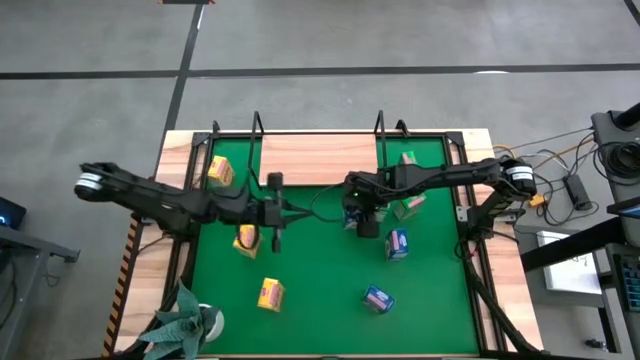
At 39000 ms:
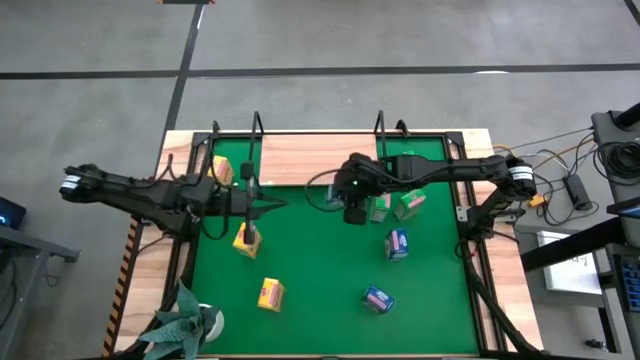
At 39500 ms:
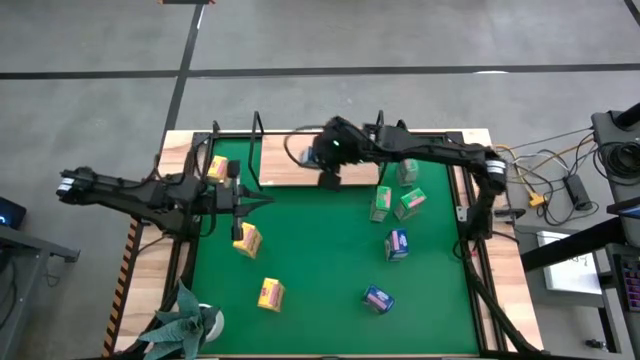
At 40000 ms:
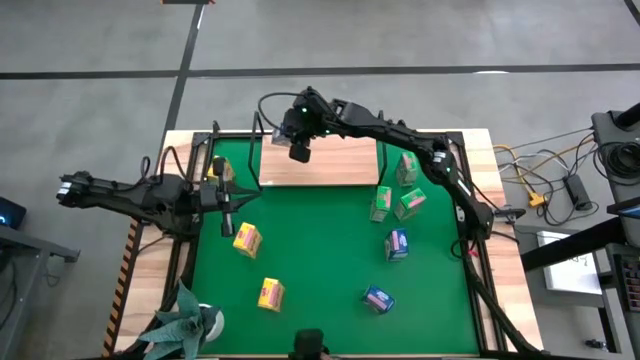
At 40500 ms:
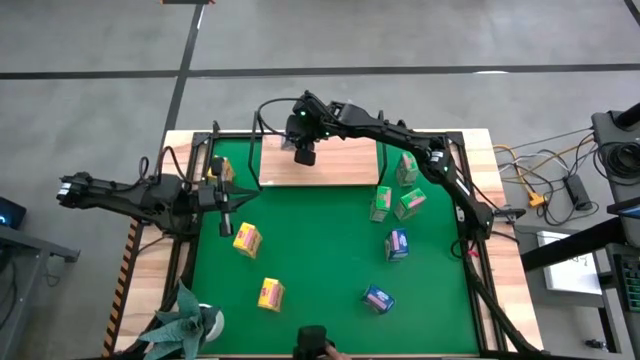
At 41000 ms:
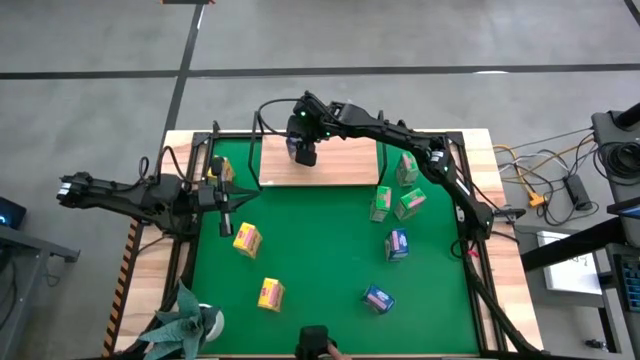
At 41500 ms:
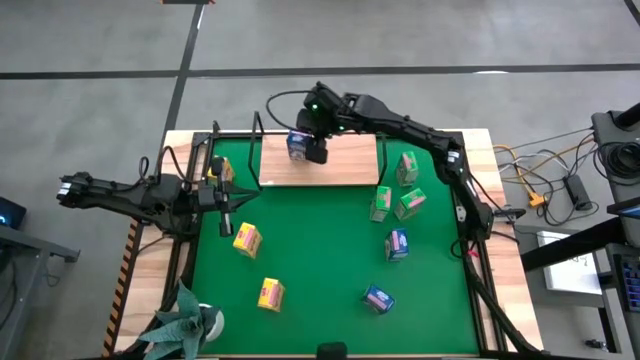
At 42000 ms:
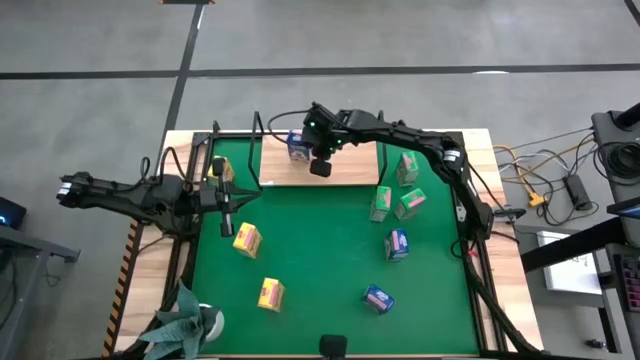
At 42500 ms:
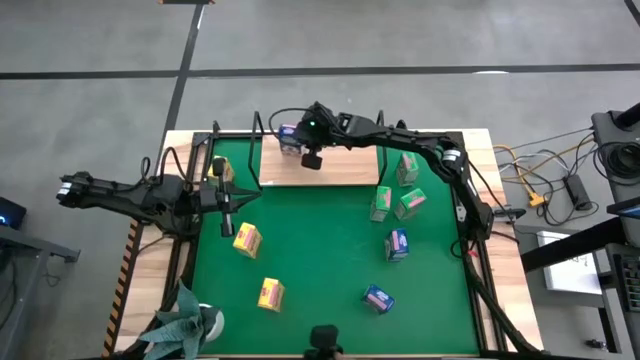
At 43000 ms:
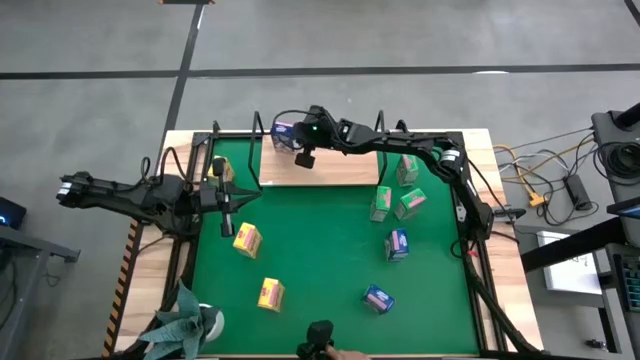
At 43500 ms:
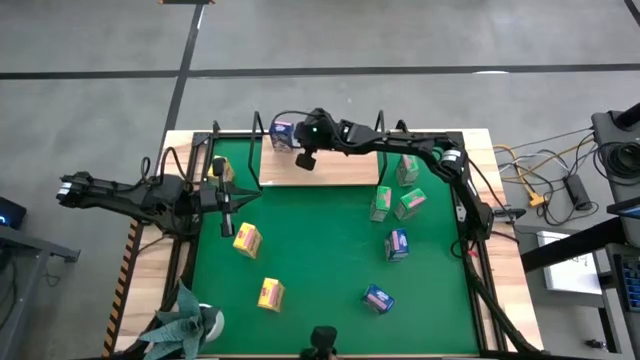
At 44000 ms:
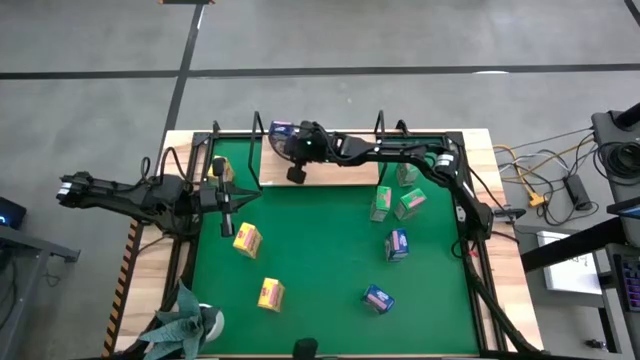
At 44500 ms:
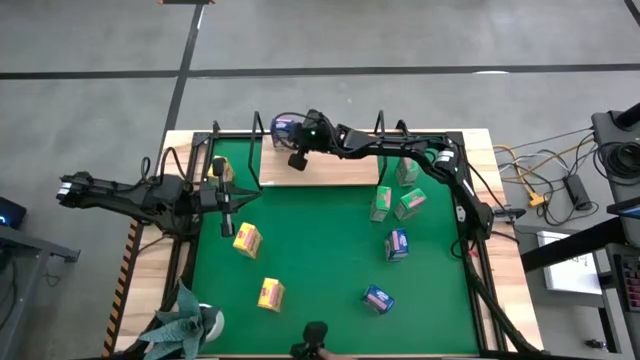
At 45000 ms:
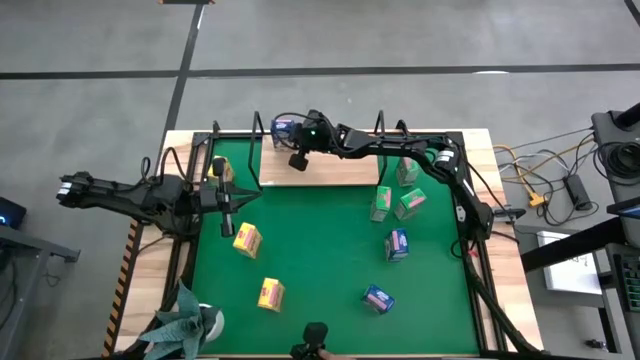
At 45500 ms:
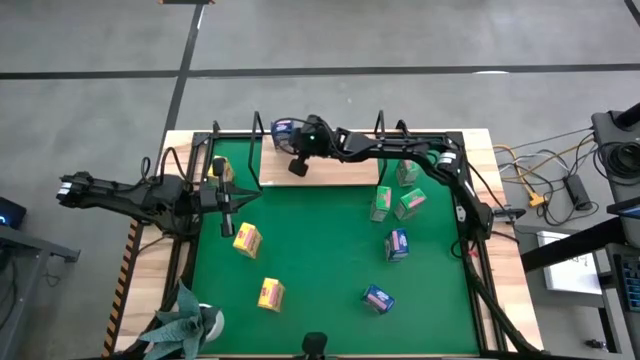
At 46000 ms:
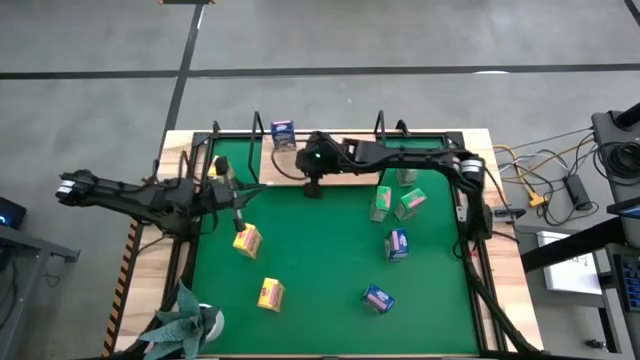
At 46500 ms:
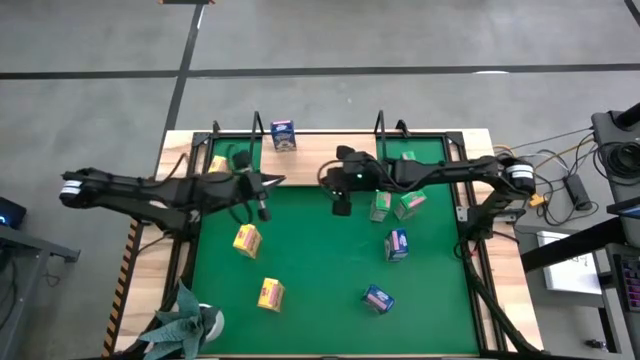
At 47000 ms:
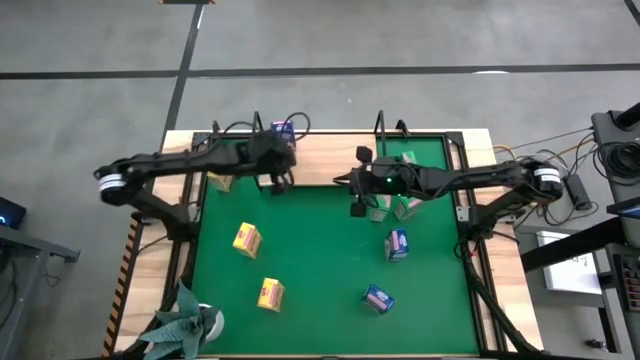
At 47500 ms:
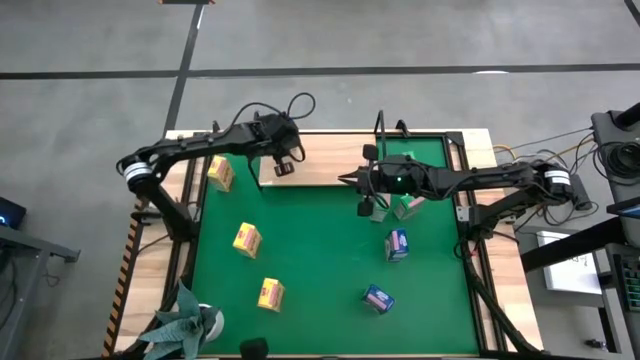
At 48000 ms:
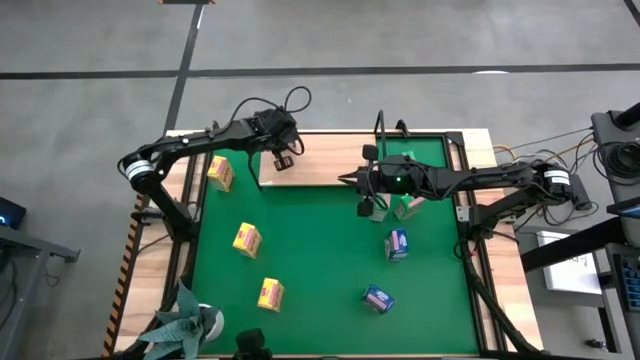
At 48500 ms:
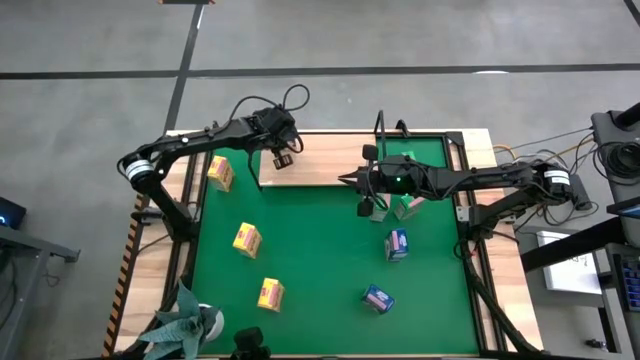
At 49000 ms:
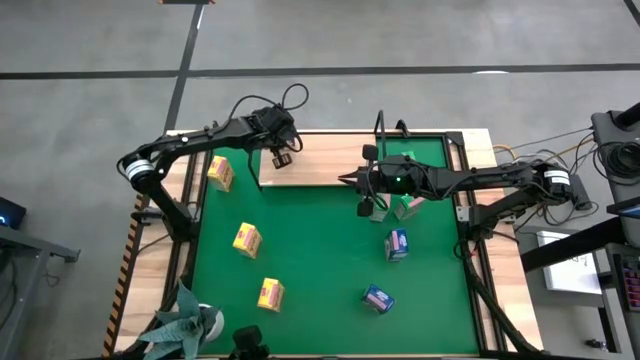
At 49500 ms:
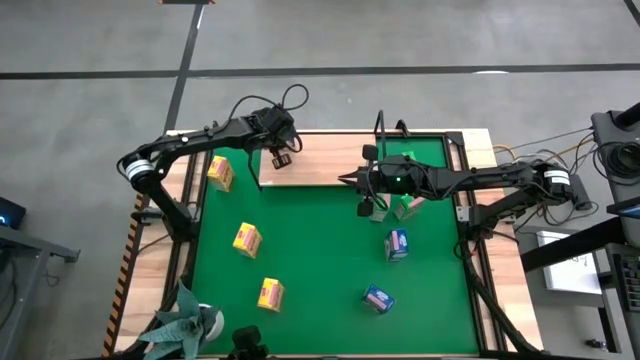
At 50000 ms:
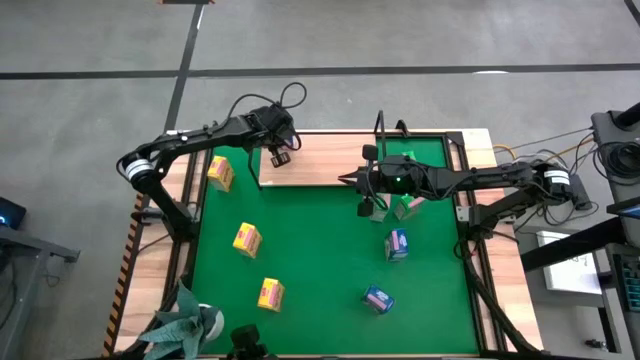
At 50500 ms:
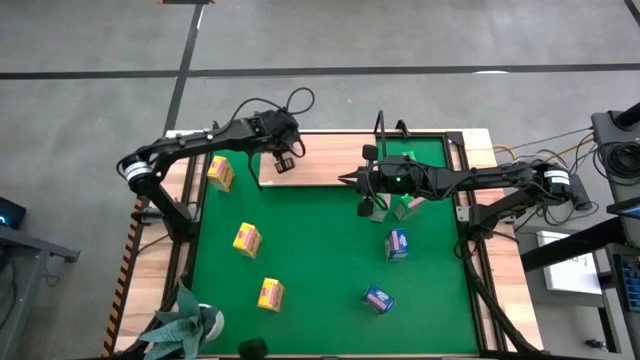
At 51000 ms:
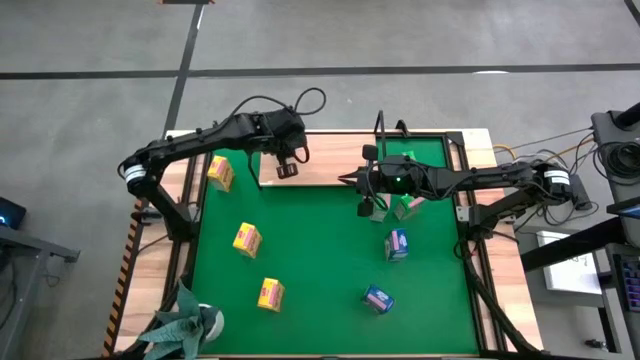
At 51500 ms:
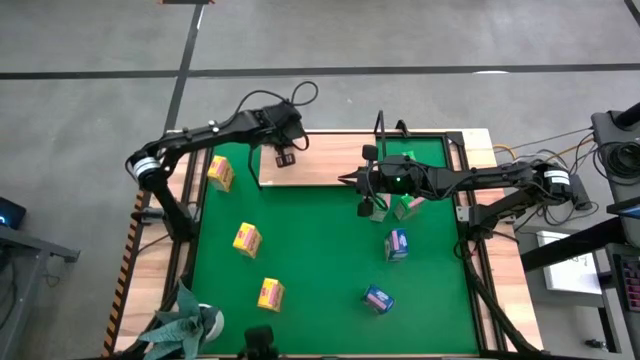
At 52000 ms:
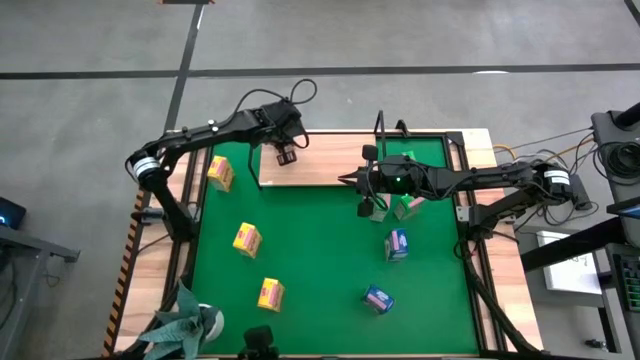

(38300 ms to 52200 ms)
Task: Stack cereal on shelf
Put the top left blue cereal box on the shelf

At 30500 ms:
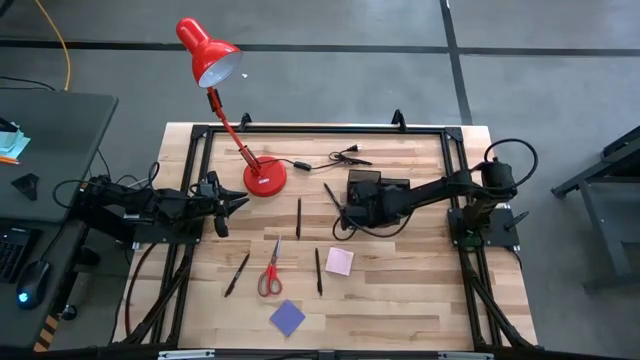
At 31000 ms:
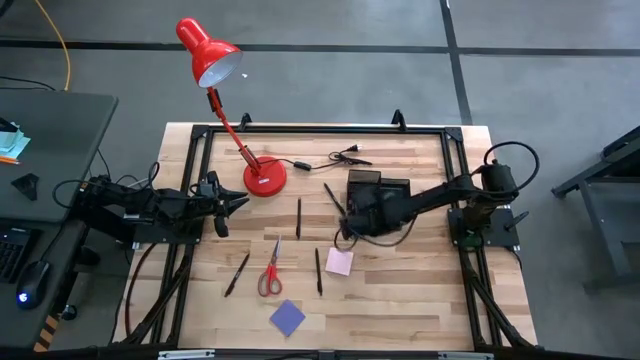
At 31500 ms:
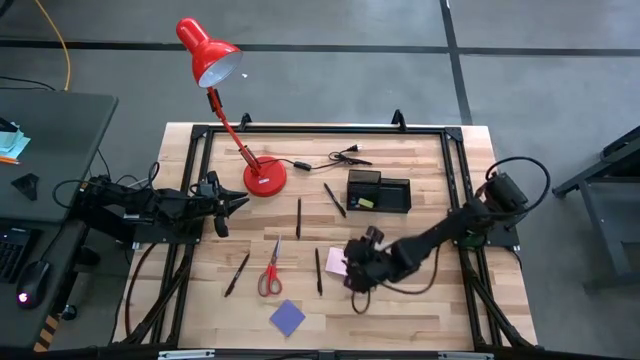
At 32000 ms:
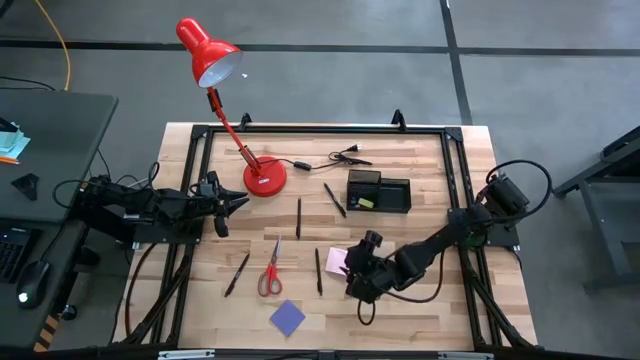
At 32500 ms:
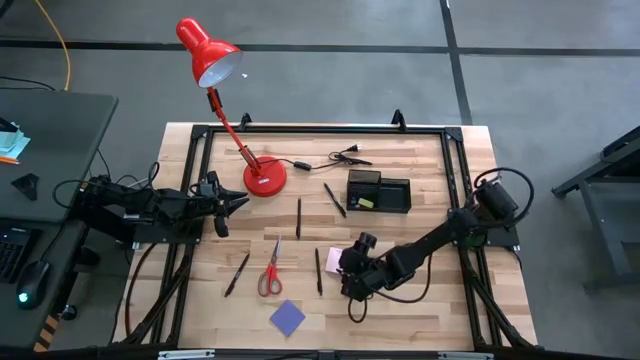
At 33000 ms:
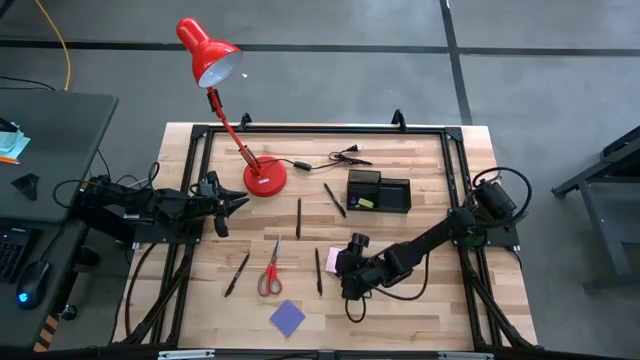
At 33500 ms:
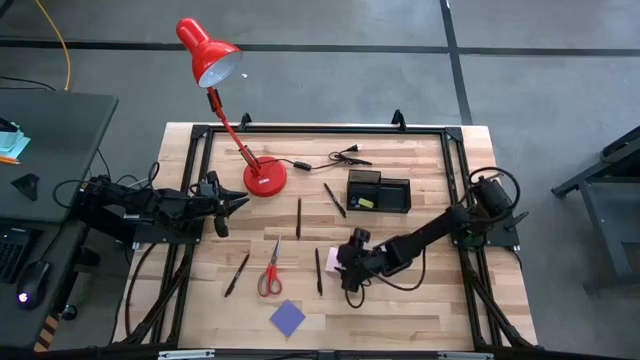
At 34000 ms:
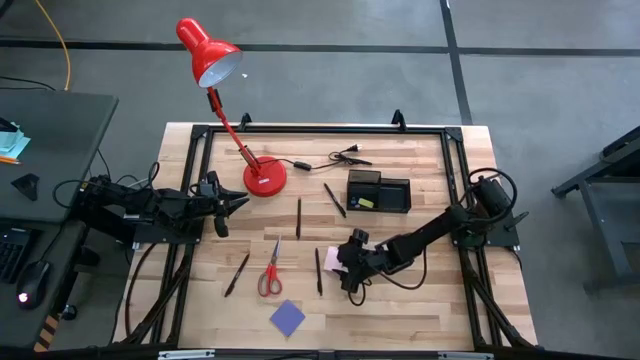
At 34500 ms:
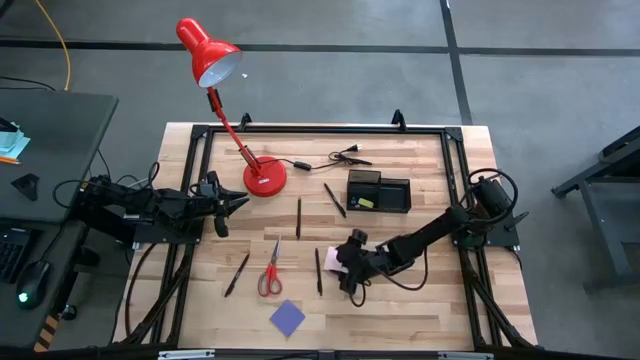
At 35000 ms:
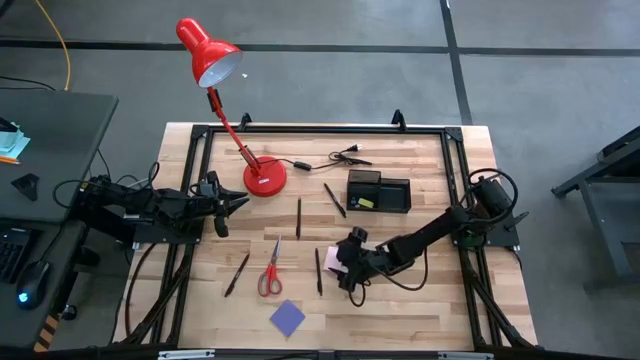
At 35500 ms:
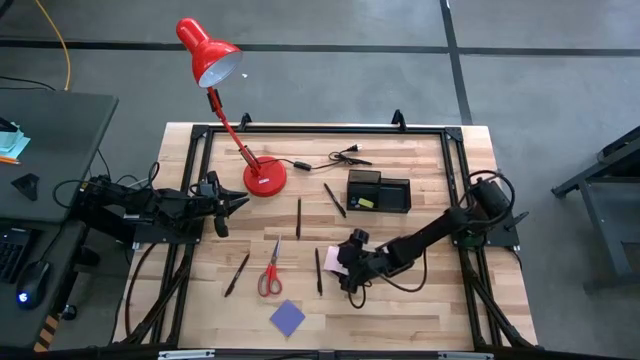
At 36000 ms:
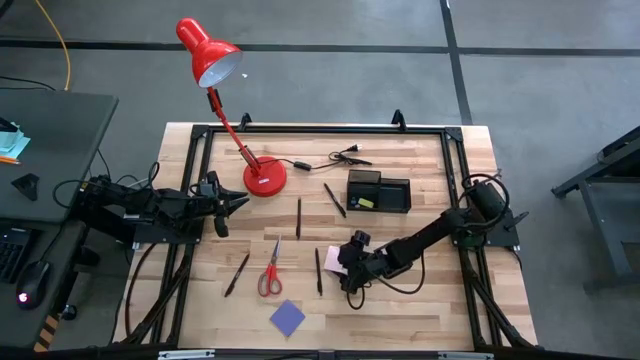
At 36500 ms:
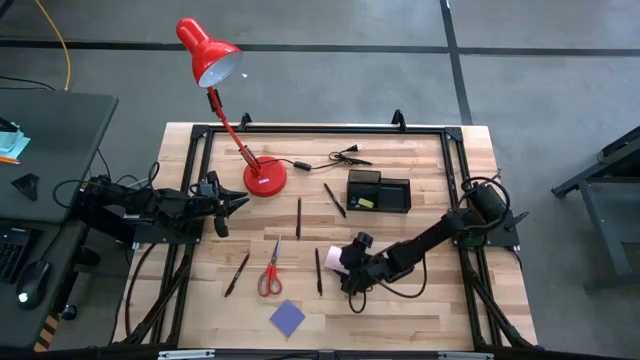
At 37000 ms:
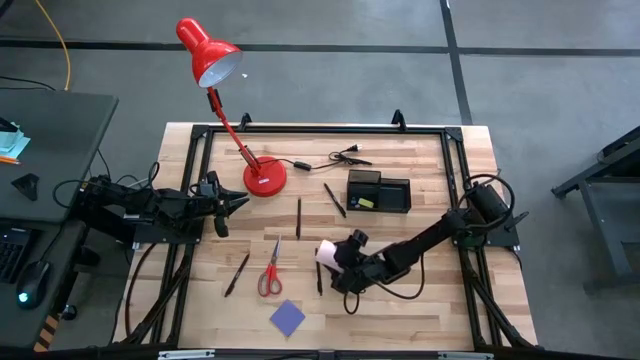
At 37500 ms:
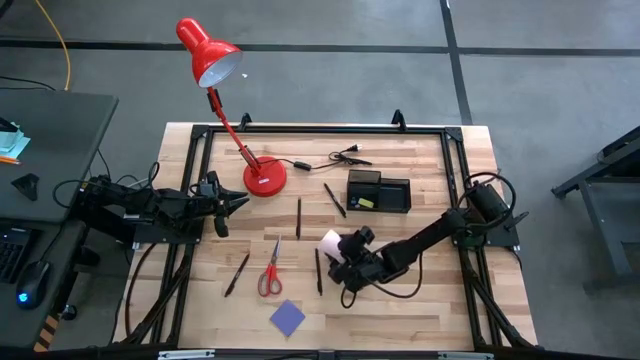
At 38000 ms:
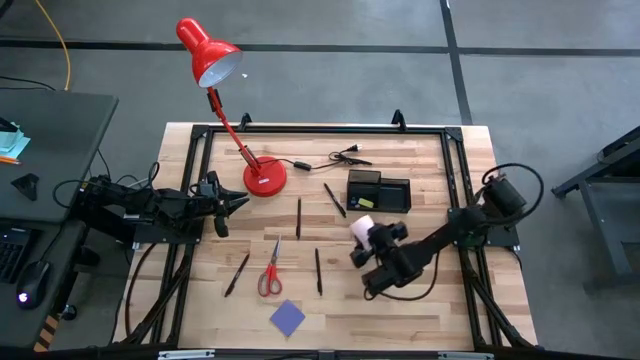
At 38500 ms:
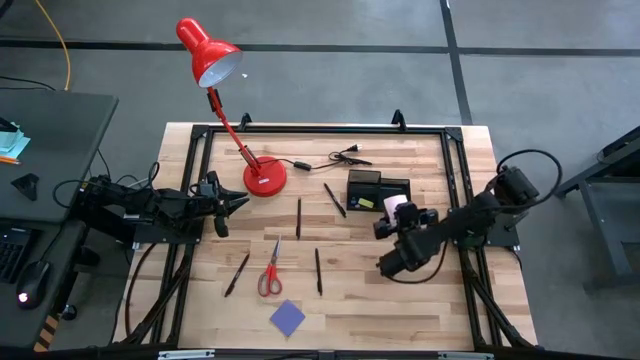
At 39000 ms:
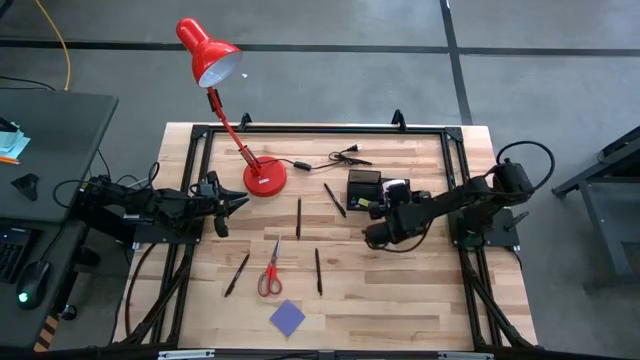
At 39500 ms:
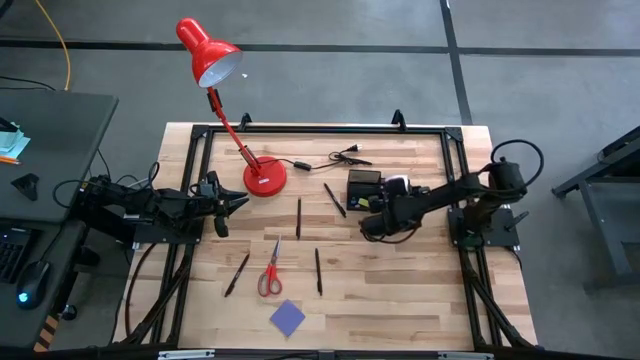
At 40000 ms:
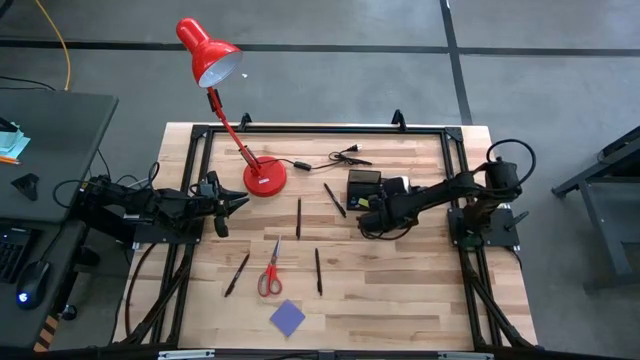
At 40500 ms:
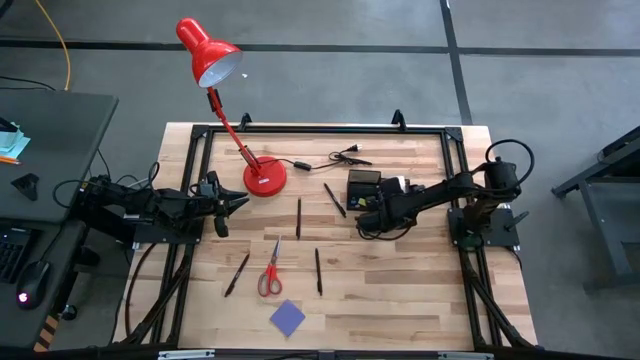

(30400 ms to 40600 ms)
Task: Pick and place office supplies into organizer
Put the top pink sticky note into the desk organizer
